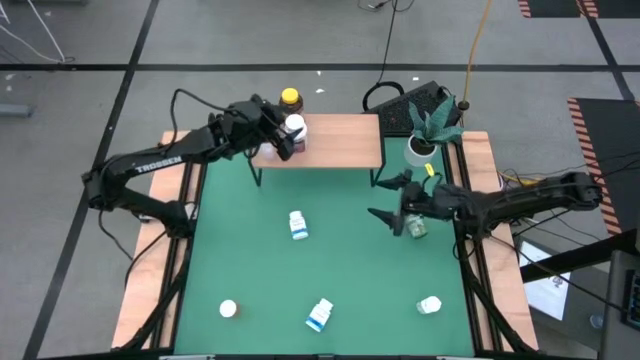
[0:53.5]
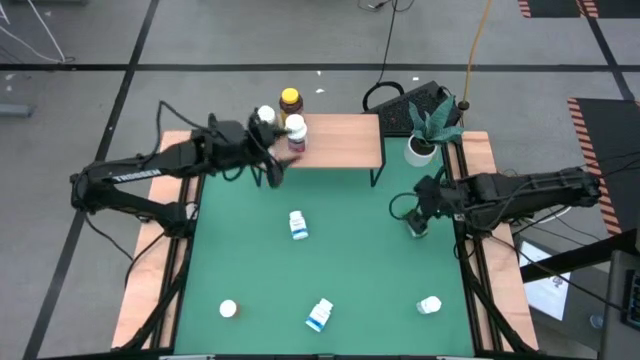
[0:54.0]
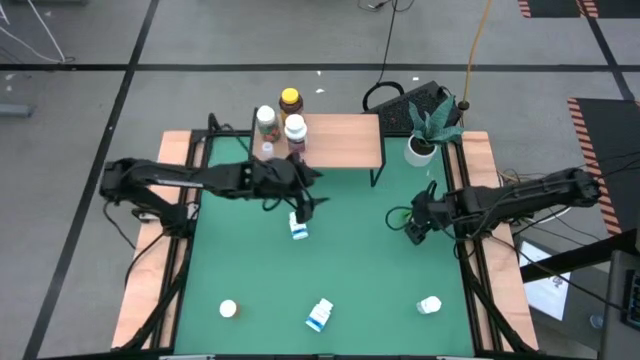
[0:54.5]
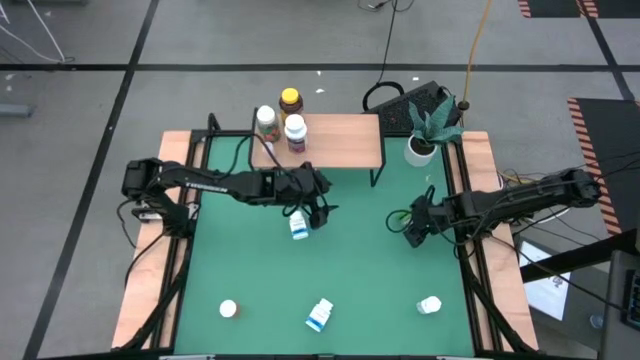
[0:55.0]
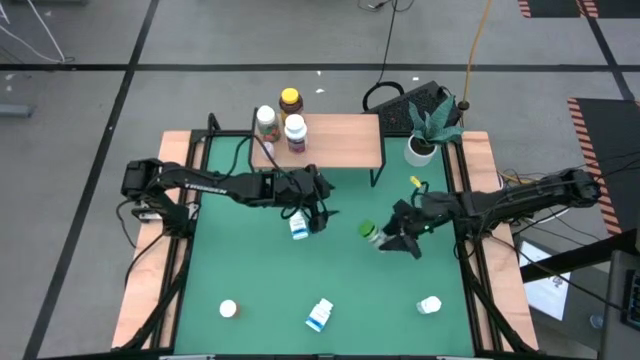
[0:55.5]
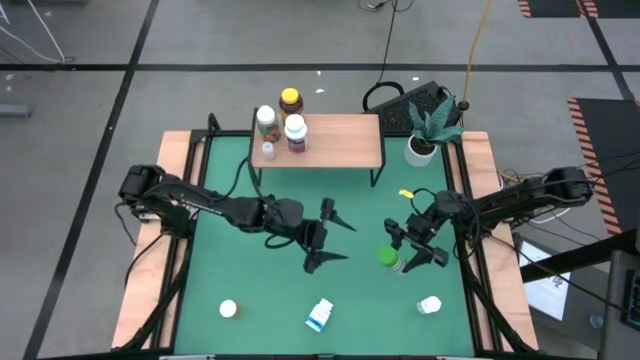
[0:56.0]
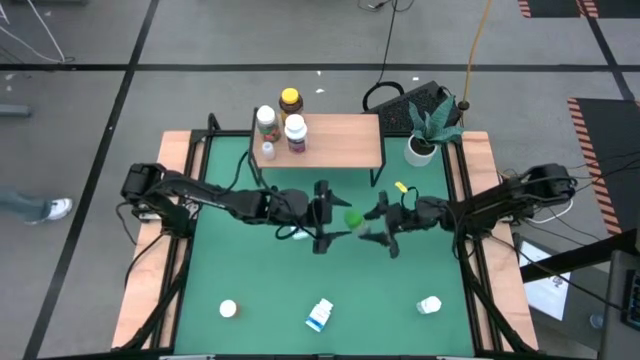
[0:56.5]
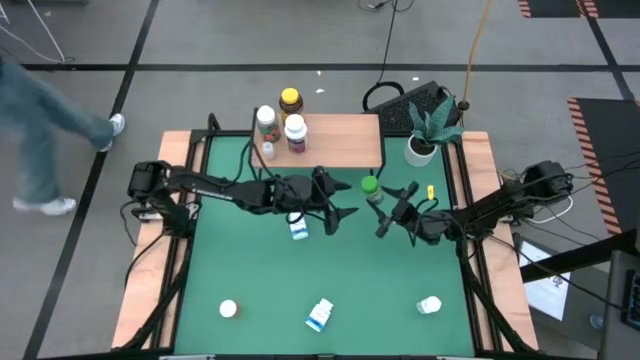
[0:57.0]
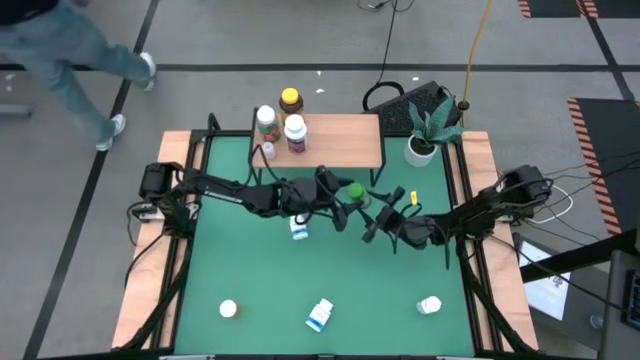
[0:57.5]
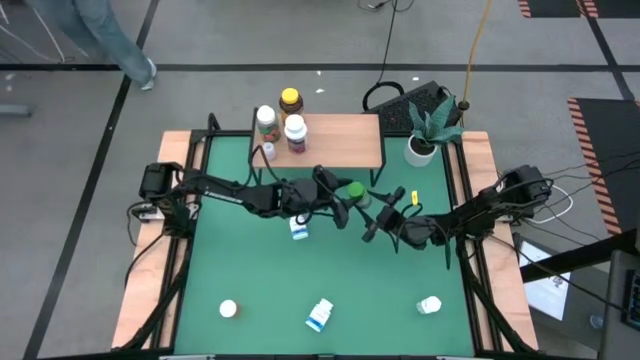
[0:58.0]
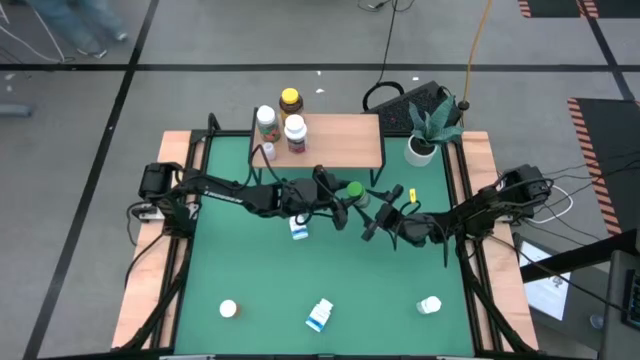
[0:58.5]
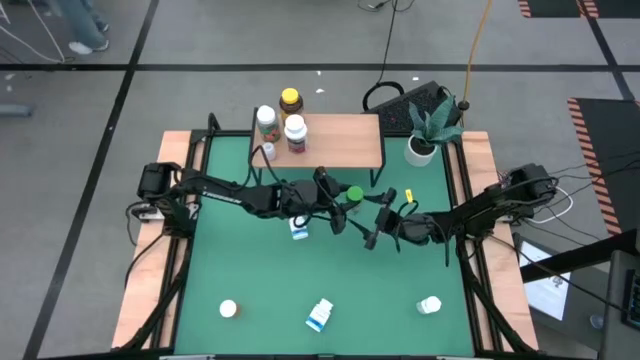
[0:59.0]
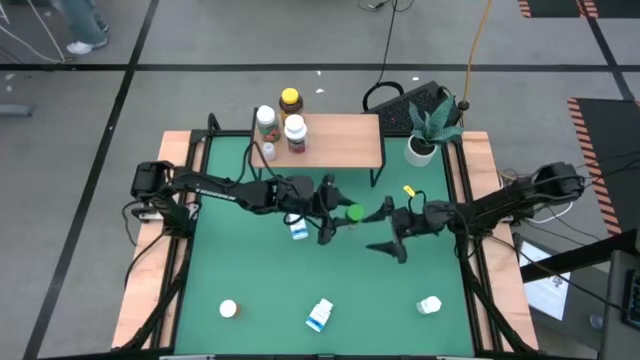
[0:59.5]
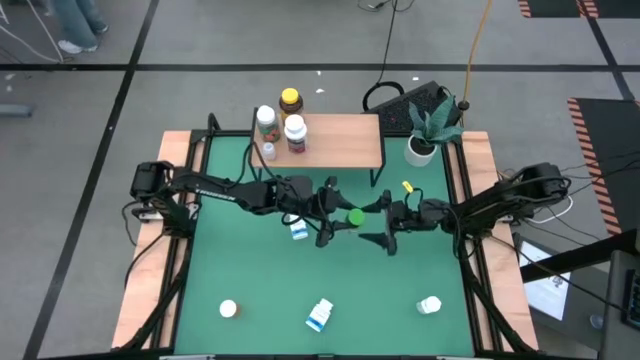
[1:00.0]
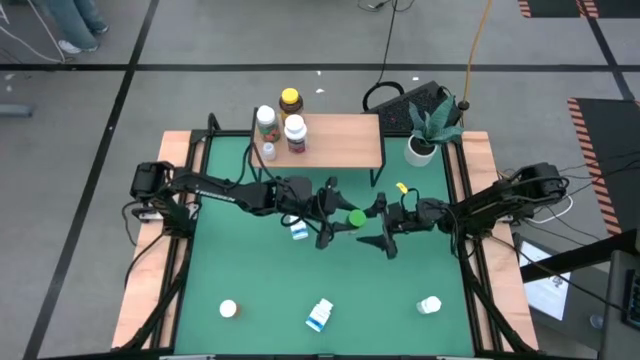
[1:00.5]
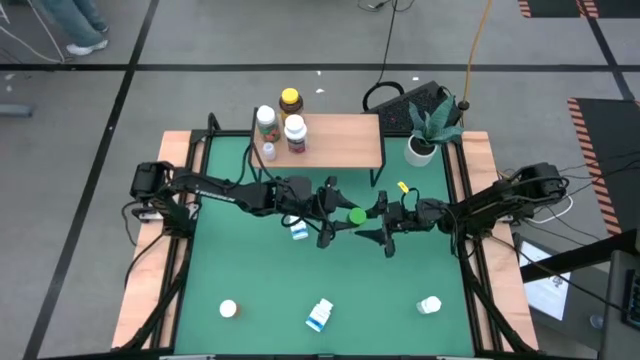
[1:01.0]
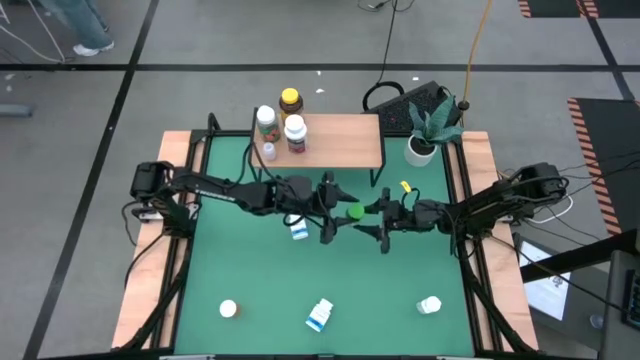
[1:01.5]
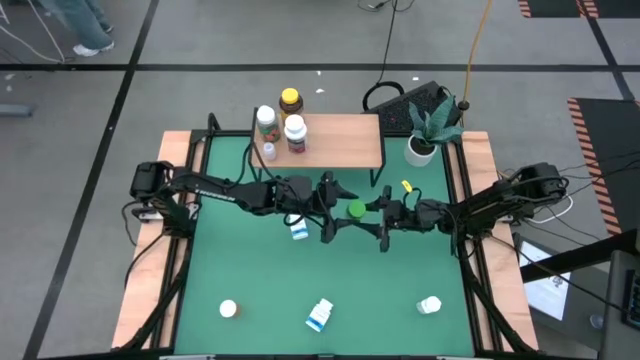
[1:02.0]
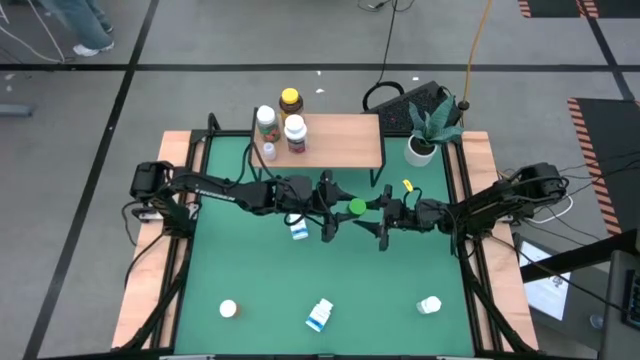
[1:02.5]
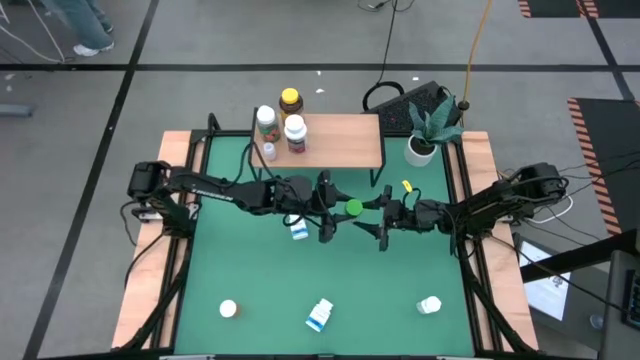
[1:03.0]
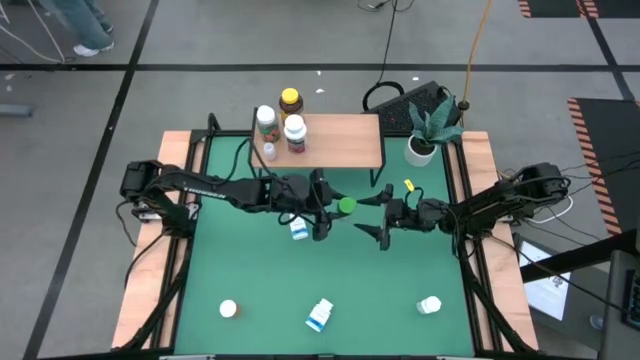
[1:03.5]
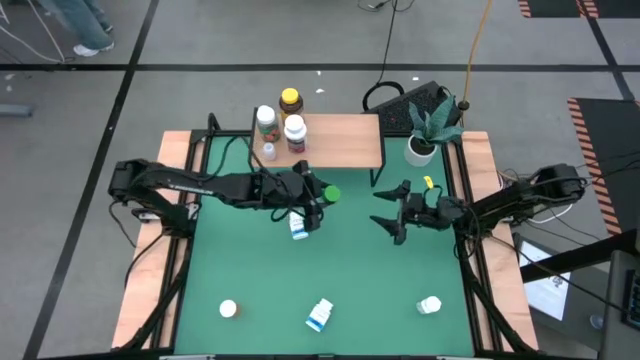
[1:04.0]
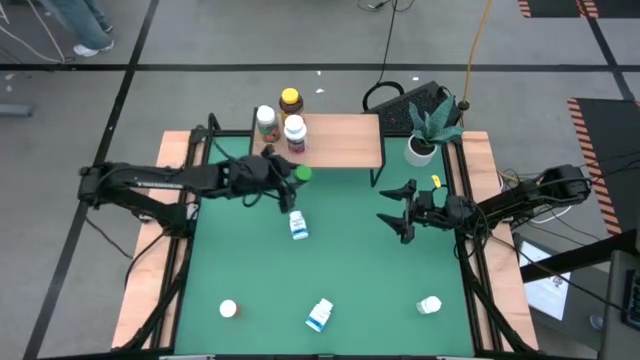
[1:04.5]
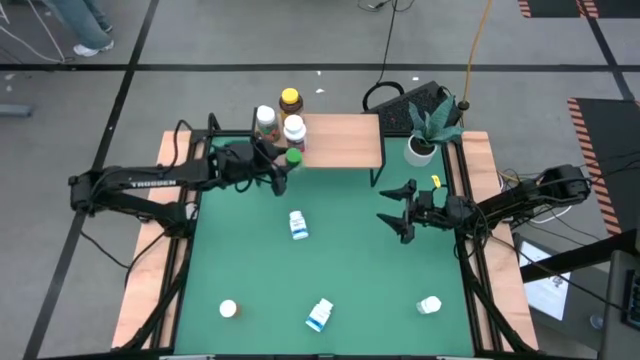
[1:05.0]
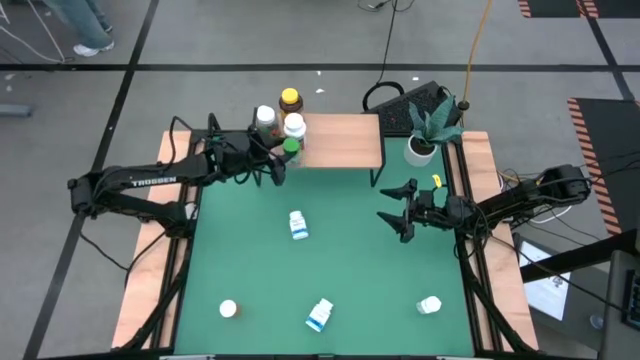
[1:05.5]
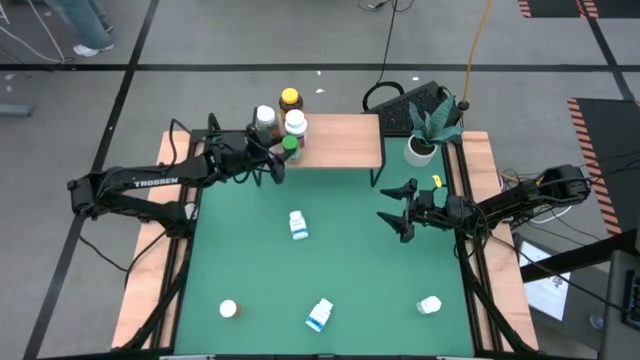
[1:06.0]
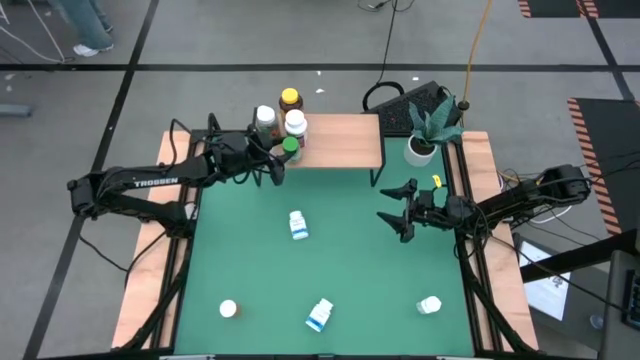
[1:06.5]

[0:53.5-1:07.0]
Task: Pick and place medicine bottles onto shelf by color
Put the green medicine bottle on the shelf

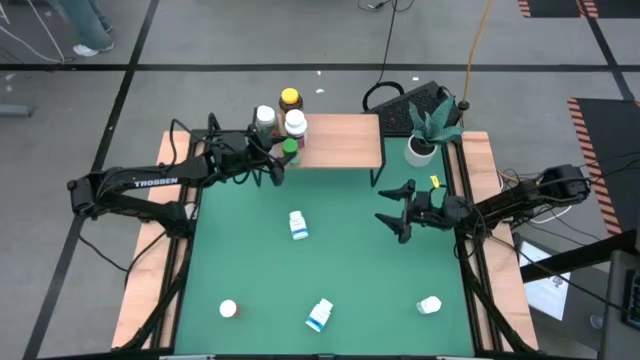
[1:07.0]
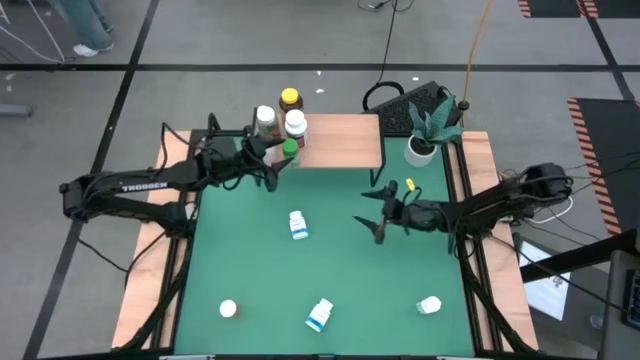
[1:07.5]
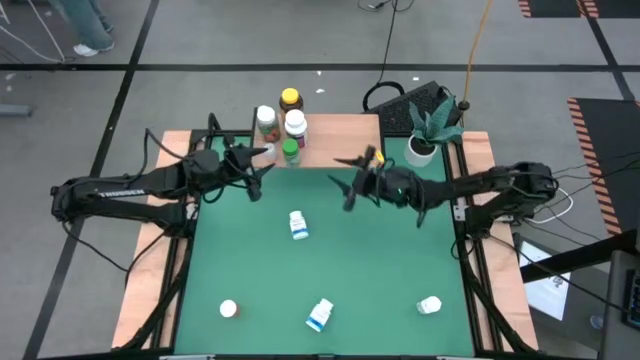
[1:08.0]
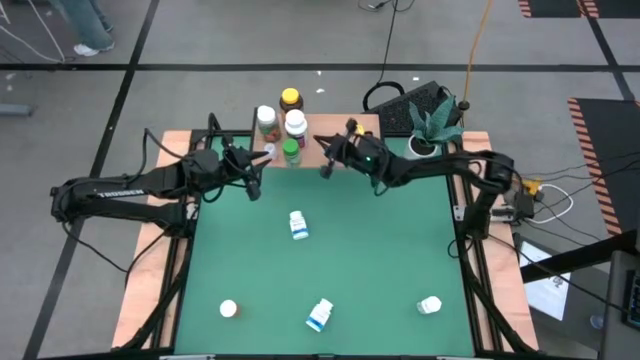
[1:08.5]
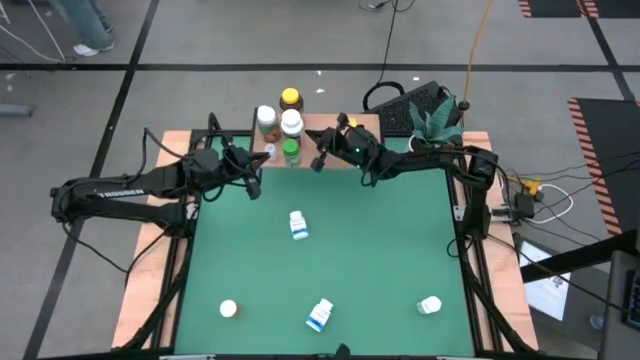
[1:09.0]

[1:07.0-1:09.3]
Adjust the white violet medicine bottle on the shelf

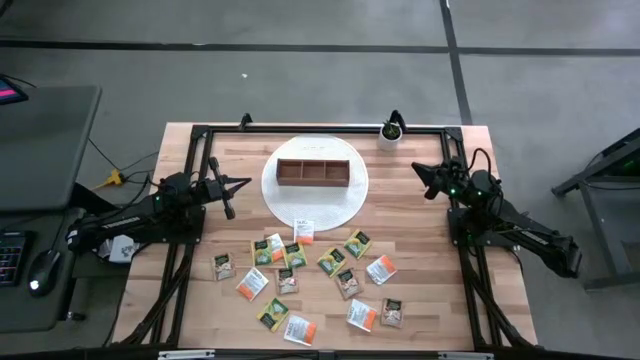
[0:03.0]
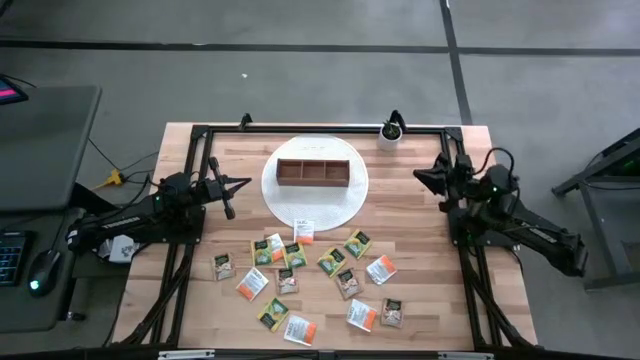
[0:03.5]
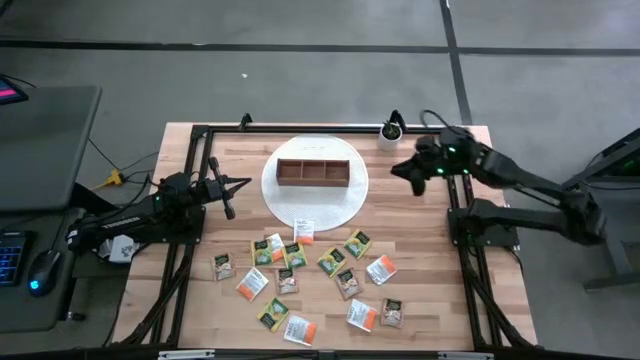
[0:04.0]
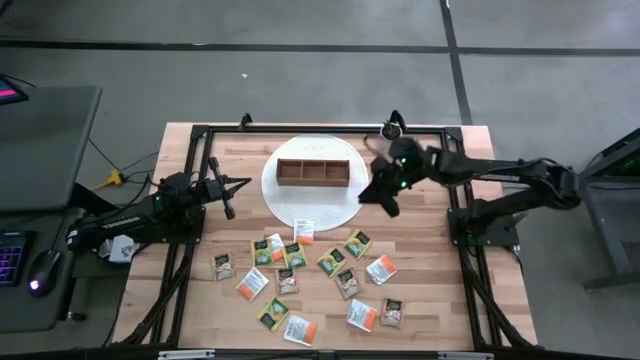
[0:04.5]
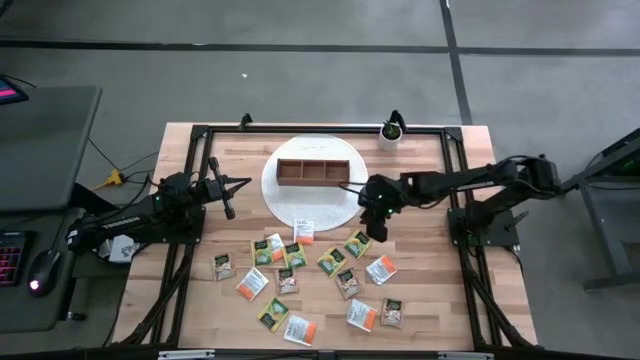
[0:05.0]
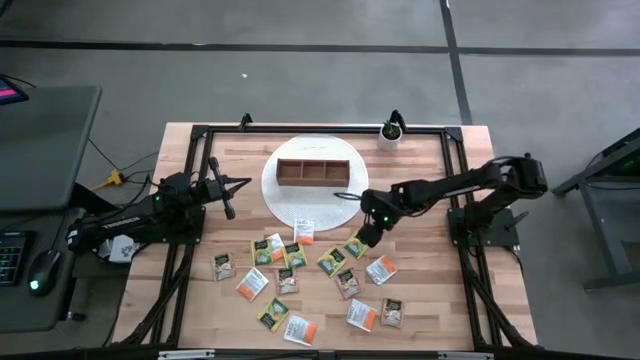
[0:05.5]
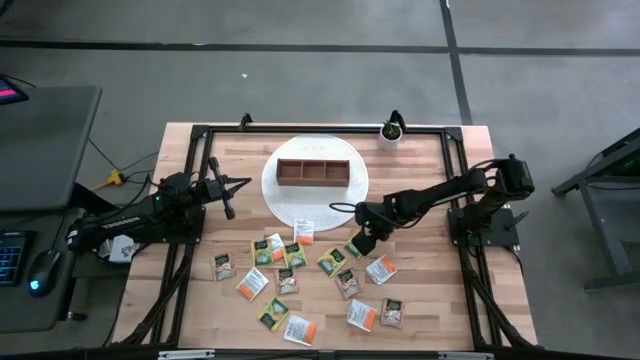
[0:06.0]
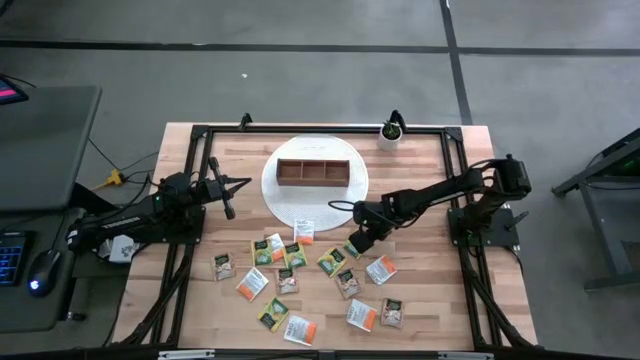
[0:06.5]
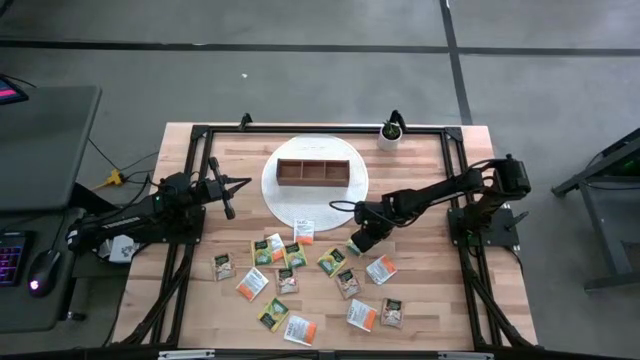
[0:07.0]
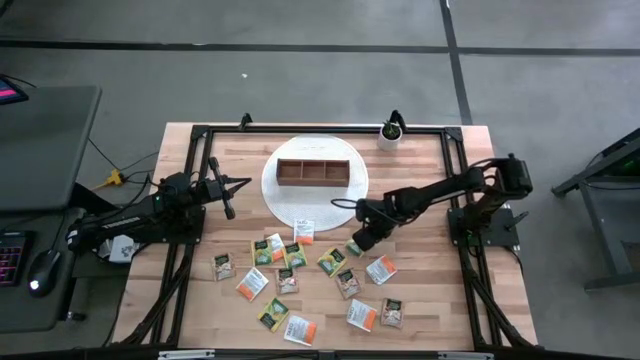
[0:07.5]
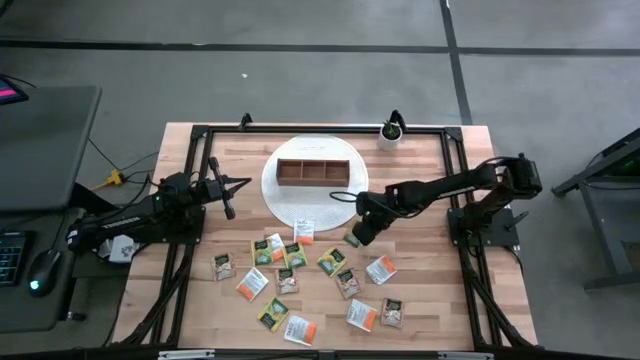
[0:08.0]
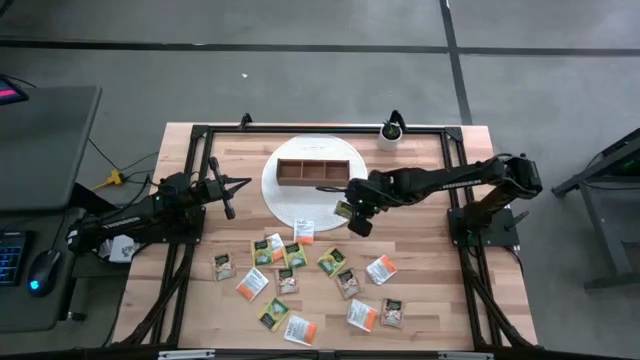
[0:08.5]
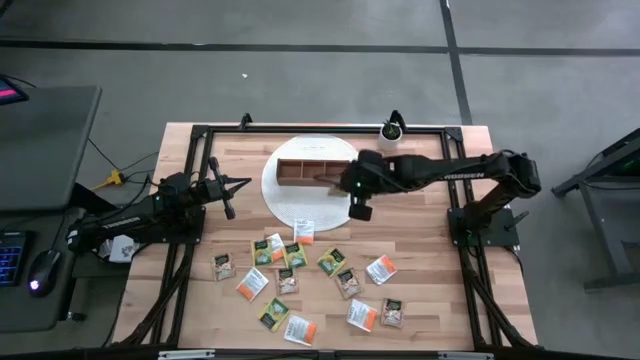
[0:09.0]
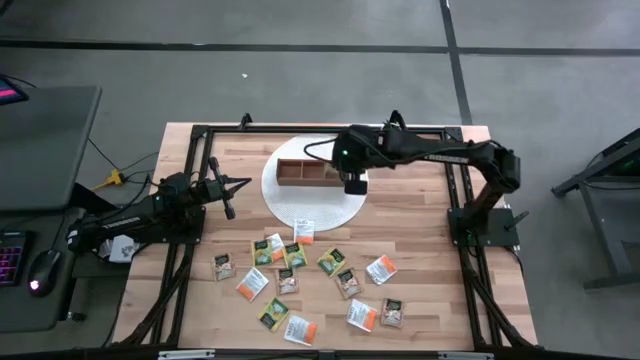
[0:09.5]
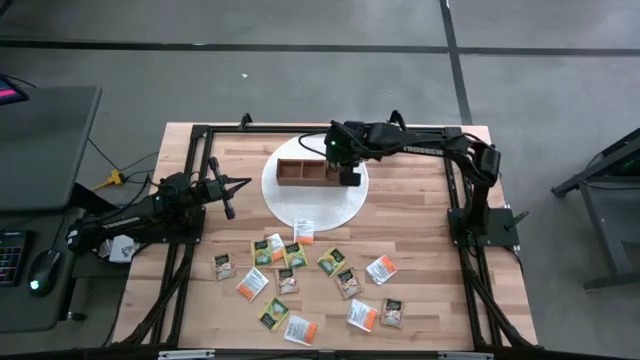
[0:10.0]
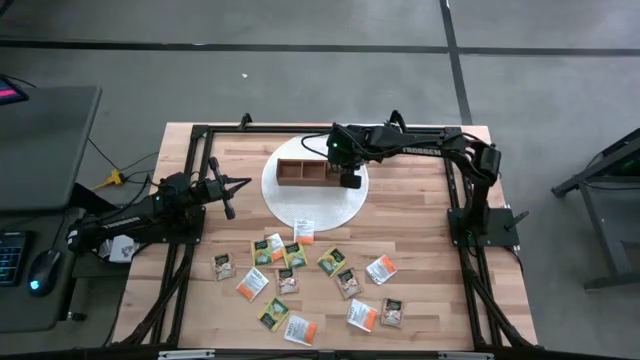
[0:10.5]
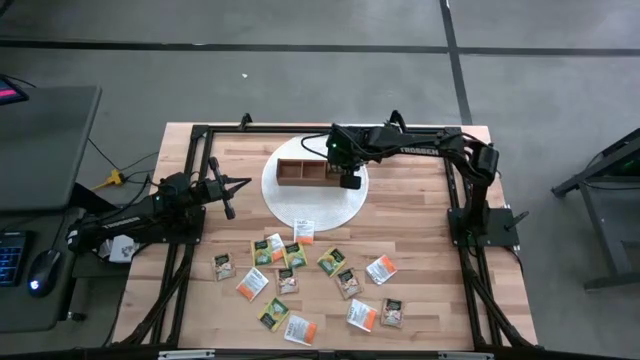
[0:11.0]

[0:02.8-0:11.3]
Task: Pick & Place Tea
Put the green tea bag into the right section of the wooden organizer
